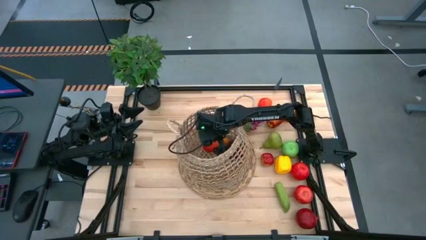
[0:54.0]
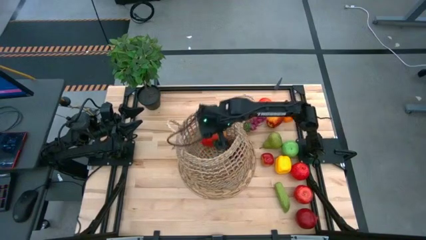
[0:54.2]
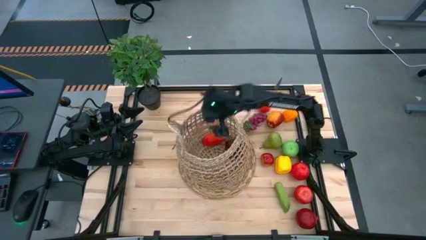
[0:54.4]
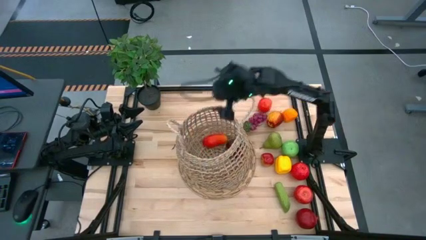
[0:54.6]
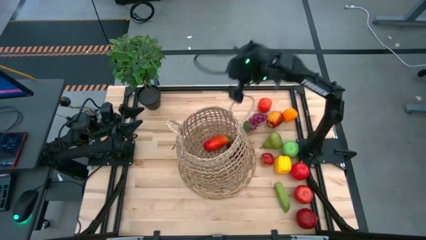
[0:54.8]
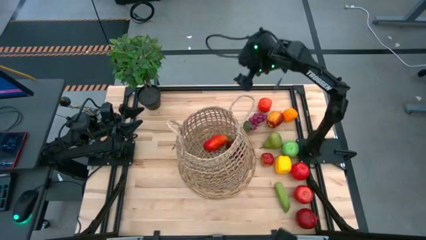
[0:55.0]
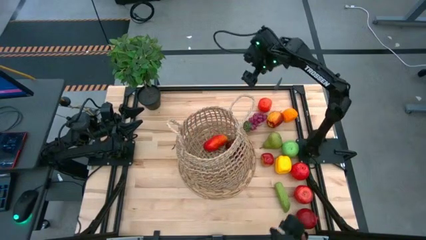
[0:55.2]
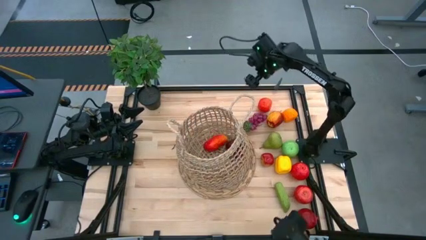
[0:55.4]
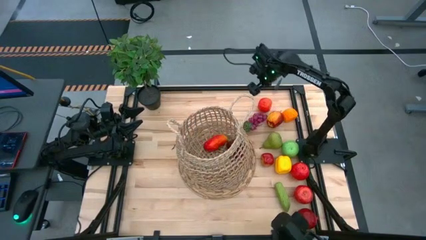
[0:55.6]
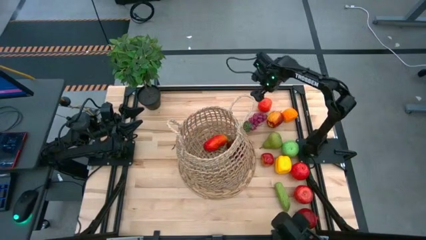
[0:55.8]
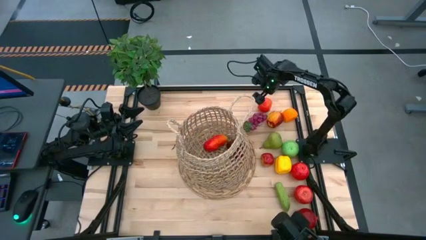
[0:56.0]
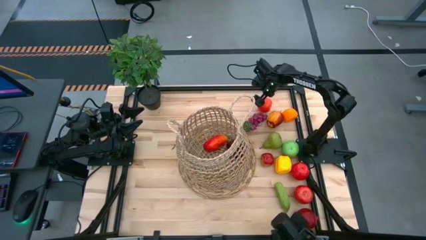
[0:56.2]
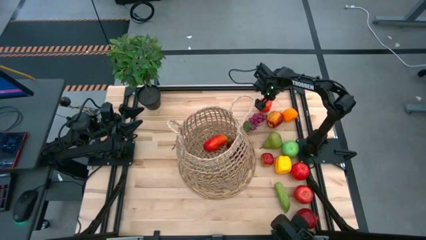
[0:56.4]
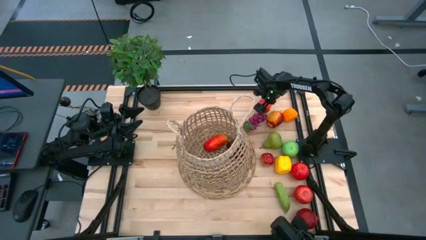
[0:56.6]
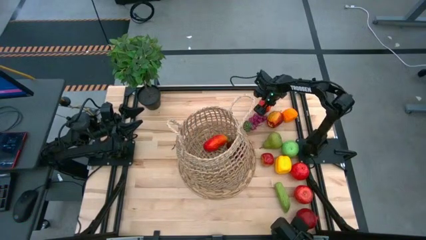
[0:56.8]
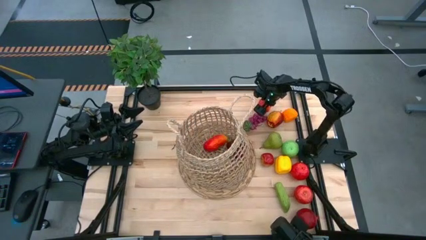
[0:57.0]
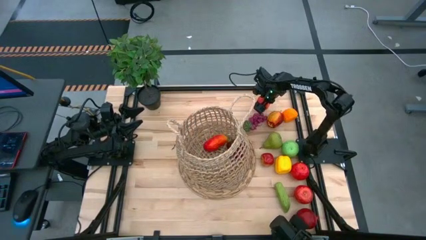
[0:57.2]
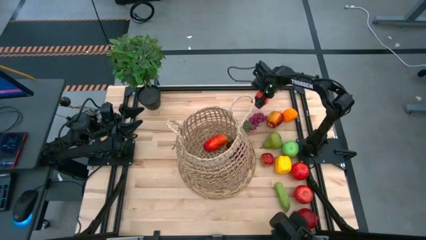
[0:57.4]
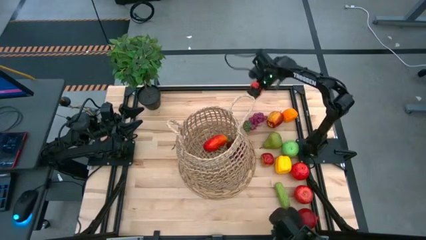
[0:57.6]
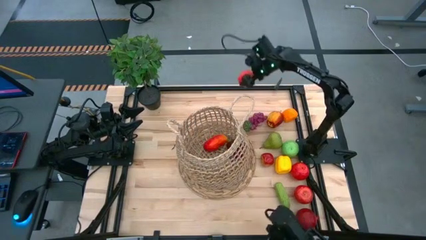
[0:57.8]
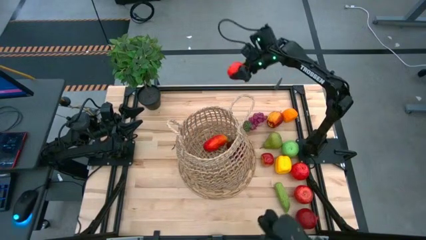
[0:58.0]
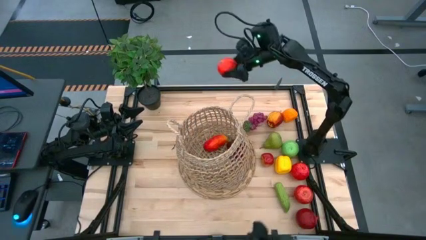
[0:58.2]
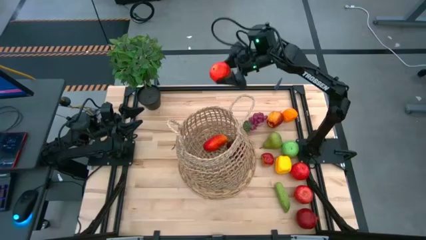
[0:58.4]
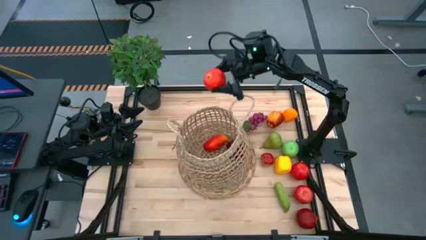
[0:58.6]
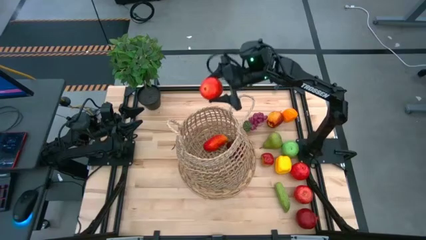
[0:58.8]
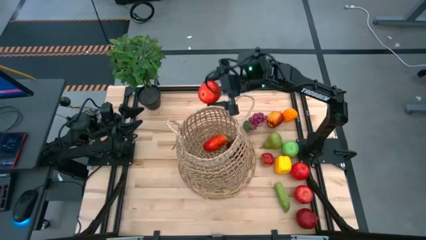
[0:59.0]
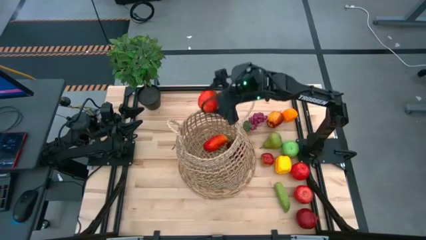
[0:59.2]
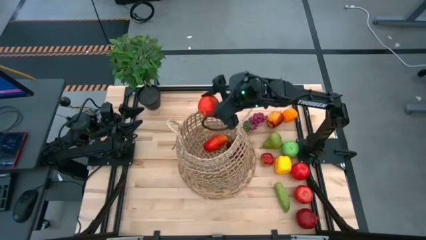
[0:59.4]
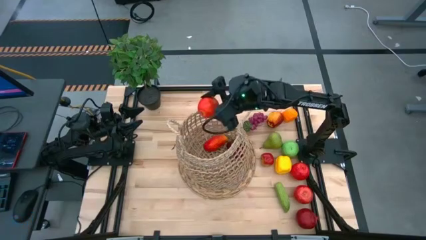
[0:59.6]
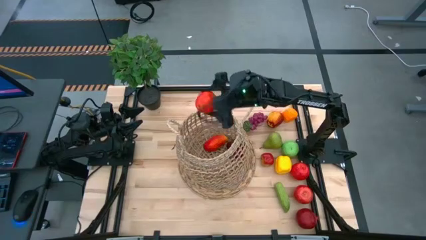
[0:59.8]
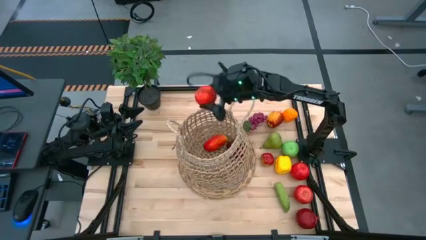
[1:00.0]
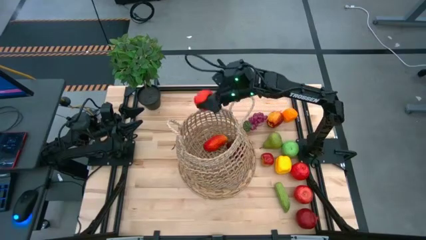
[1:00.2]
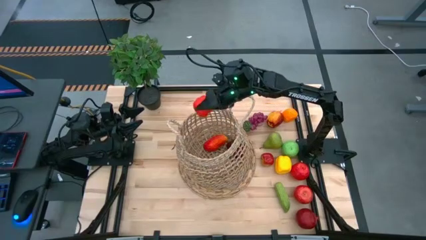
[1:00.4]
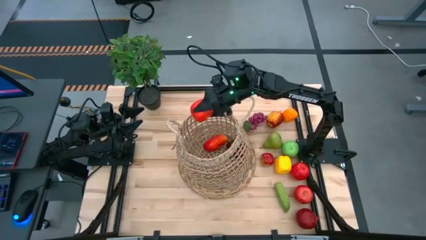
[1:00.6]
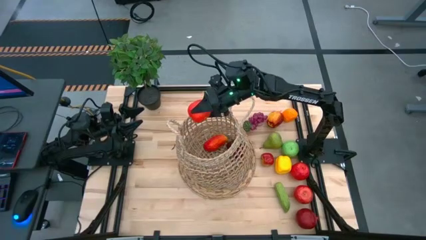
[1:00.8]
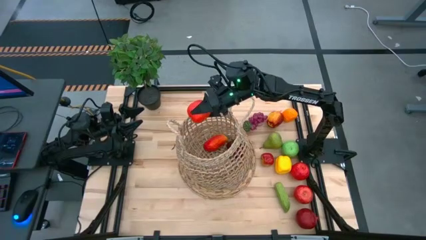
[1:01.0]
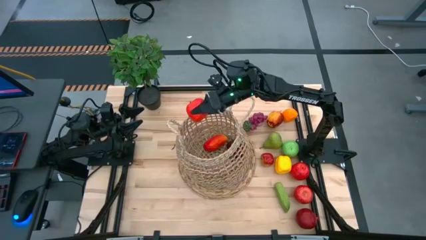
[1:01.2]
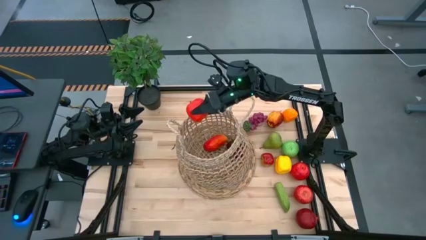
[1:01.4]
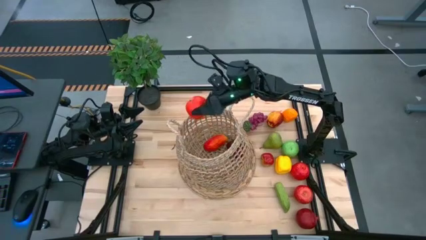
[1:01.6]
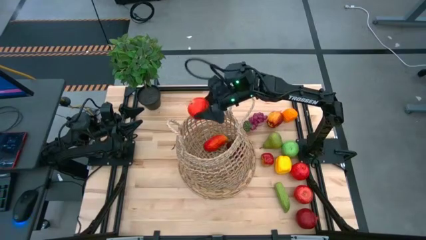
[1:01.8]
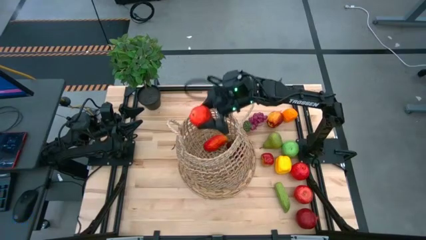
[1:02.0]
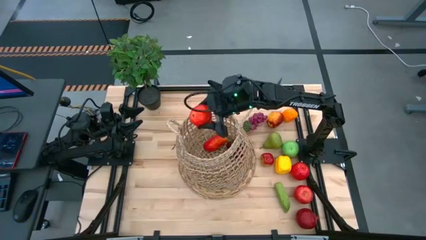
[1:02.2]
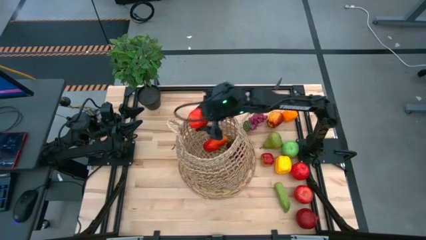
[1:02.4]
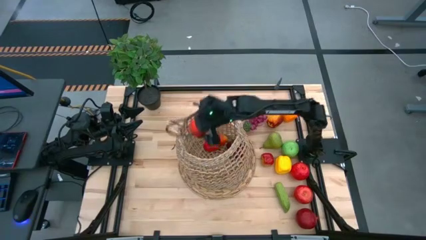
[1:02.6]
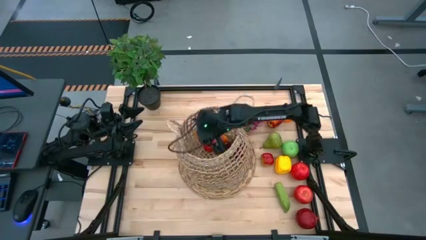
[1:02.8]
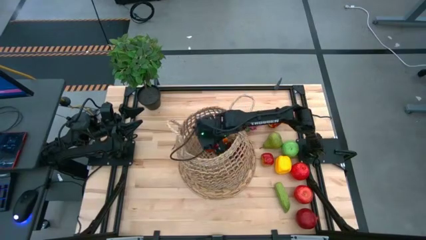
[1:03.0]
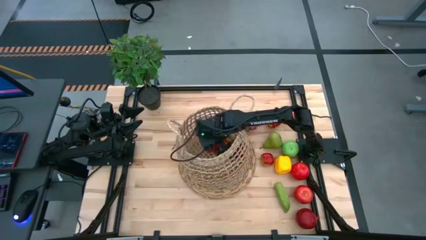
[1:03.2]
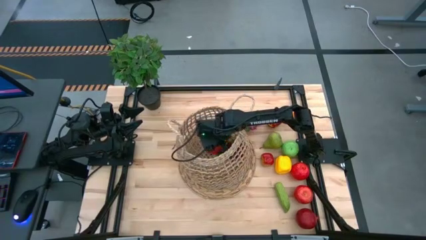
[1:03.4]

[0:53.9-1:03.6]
Task: Build produce basket
Put the top red apple into the brown basket

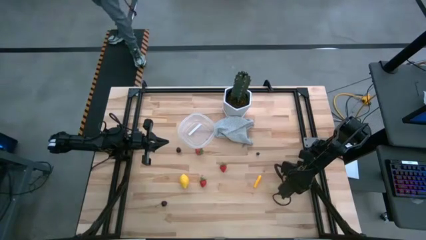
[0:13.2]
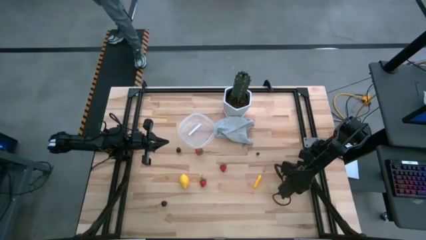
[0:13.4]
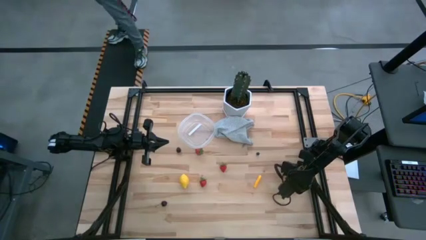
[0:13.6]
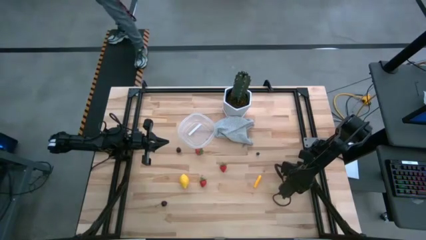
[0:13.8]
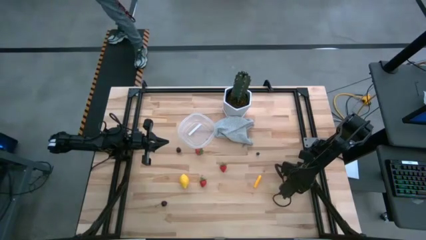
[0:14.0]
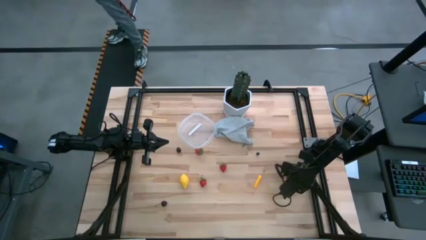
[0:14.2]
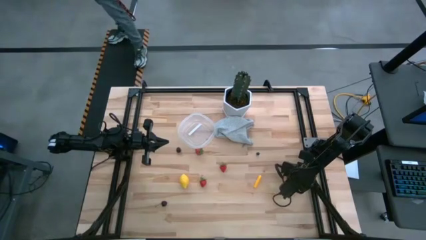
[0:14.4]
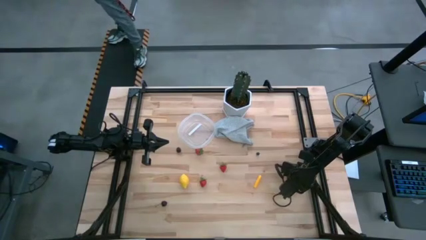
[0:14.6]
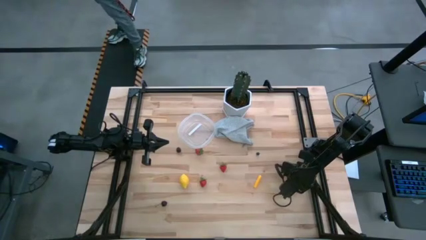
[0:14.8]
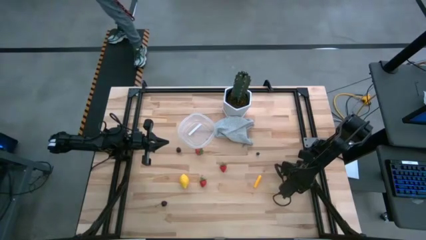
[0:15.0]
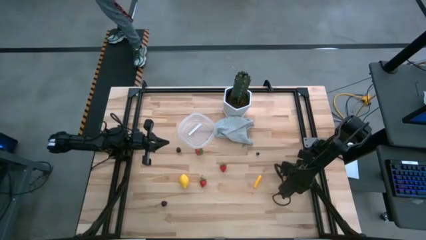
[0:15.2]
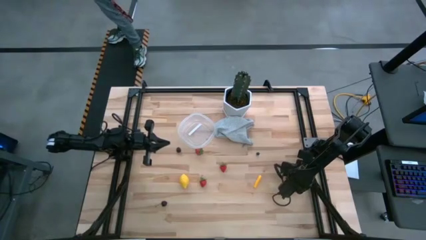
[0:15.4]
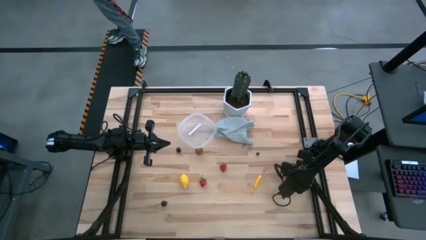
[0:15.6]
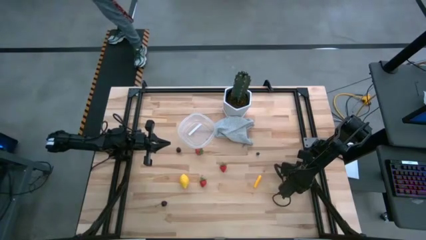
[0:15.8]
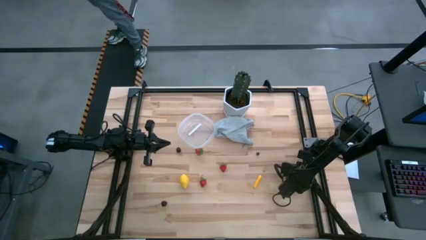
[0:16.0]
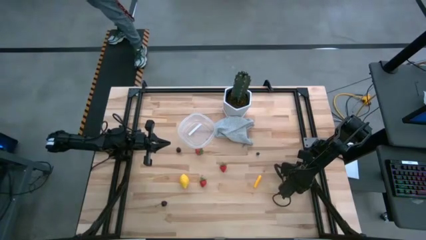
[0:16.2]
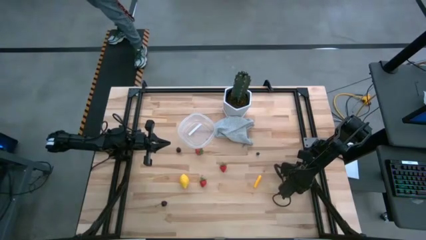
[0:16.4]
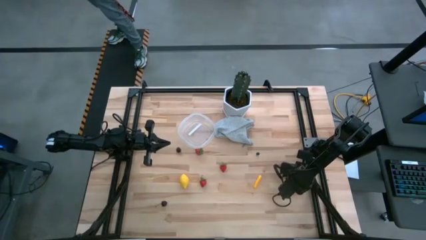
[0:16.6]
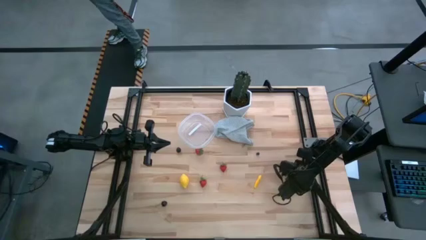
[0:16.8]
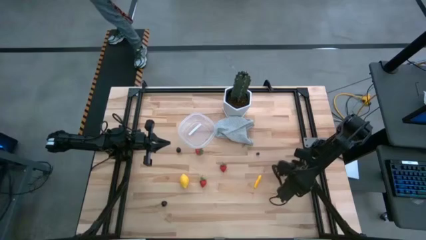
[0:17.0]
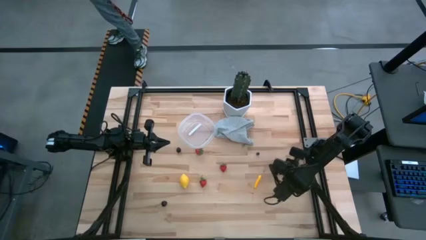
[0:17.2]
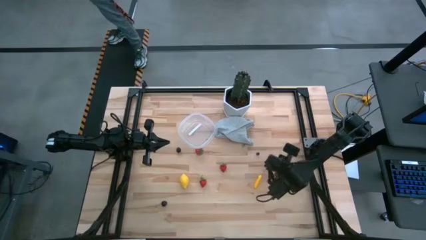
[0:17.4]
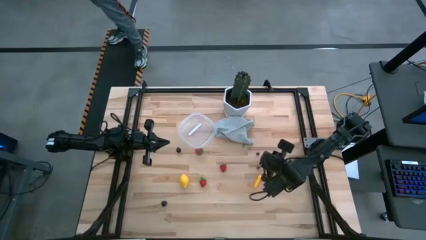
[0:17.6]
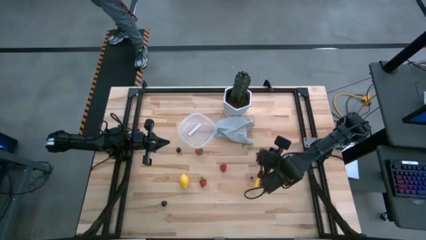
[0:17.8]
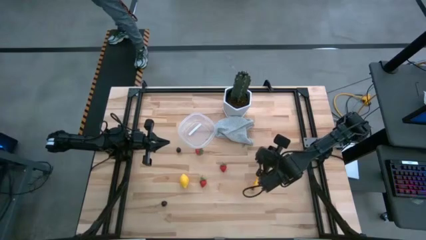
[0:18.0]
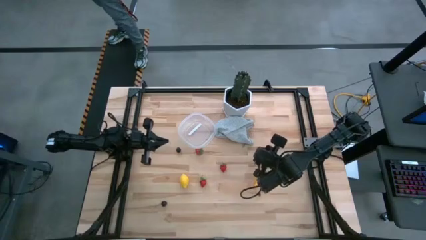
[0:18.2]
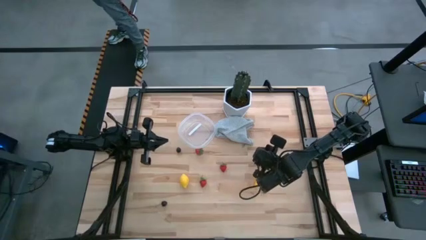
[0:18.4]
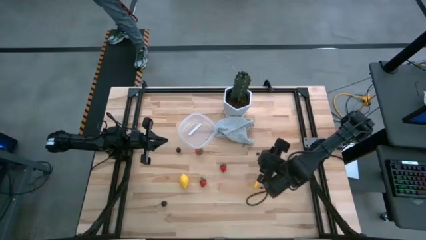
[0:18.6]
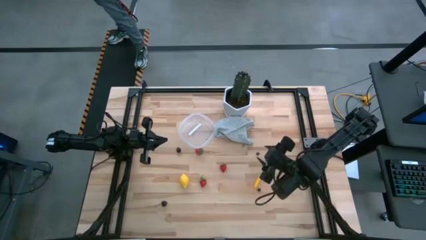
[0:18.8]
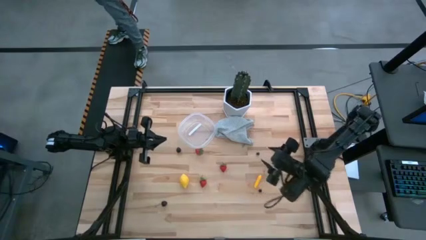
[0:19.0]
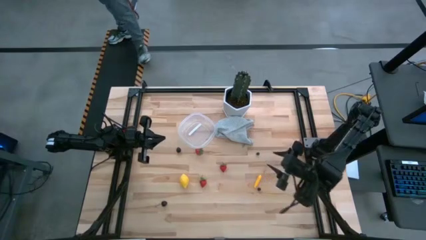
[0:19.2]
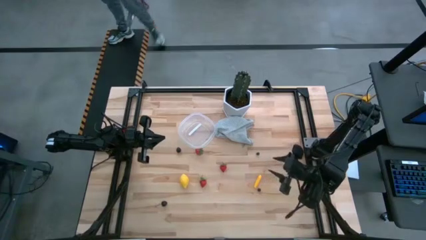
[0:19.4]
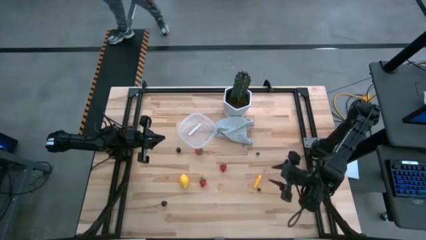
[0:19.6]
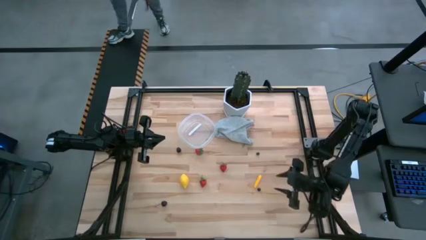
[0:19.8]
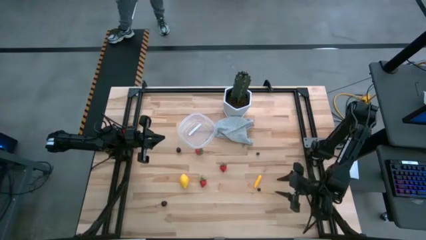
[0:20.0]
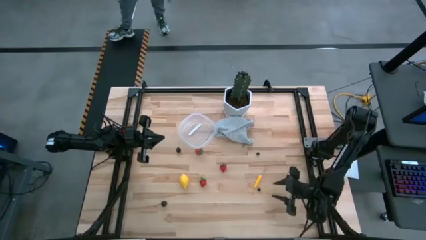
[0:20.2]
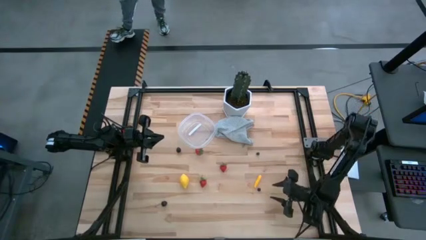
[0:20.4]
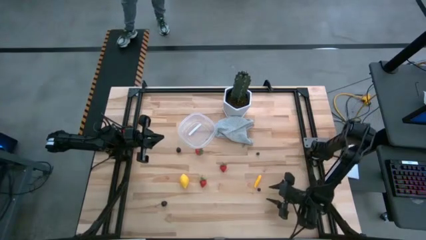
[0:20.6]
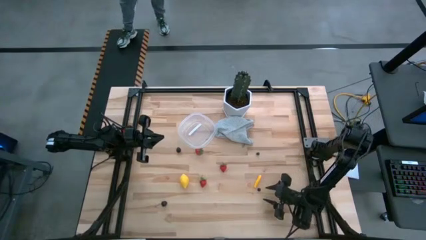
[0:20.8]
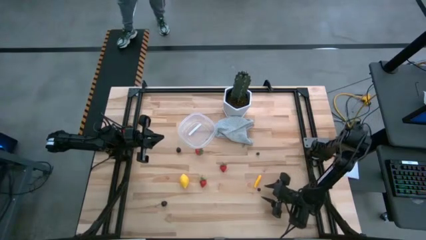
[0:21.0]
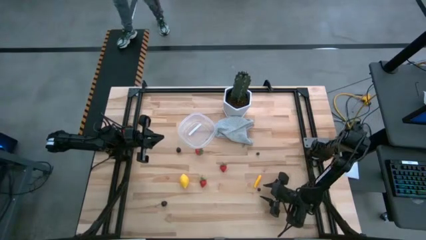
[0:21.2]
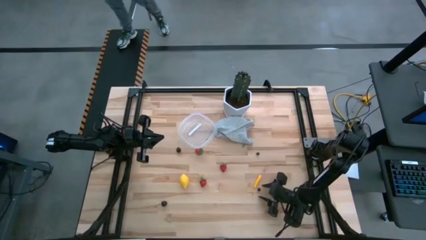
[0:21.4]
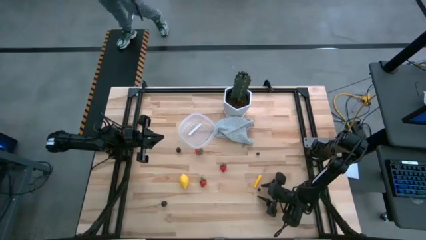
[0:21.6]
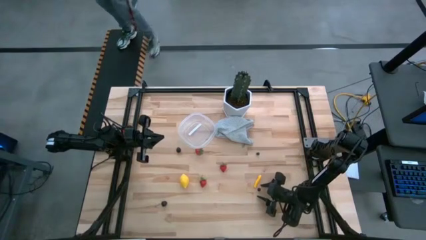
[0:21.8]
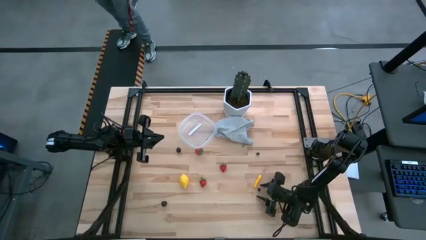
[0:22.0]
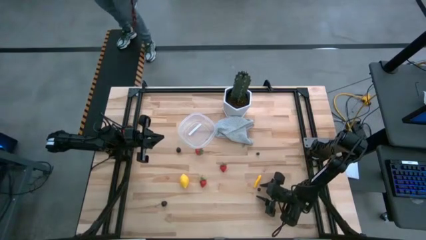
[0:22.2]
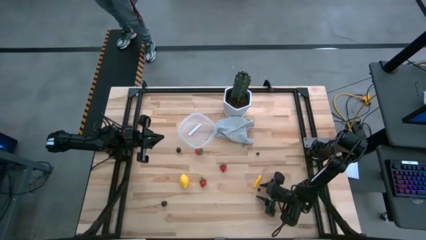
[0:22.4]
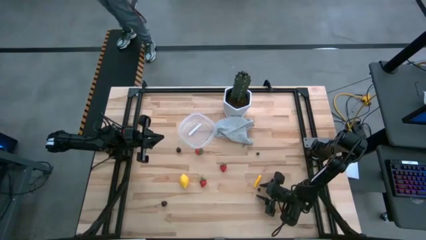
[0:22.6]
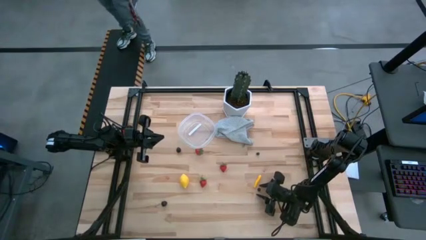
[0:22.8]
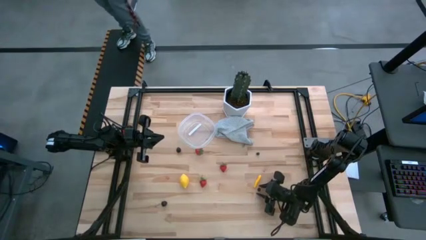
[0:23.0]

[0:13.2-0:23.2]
Task: Pick and placing Produce into tupperware
Put the bottom blueberry into the transparent bin
